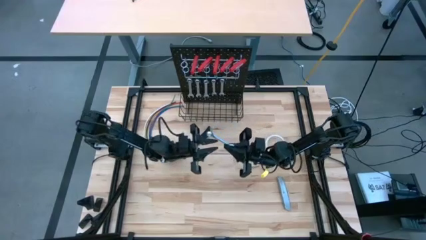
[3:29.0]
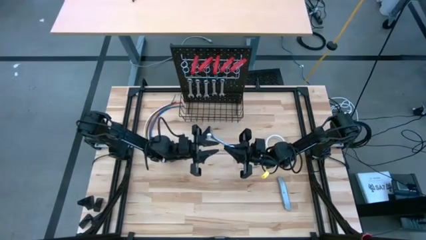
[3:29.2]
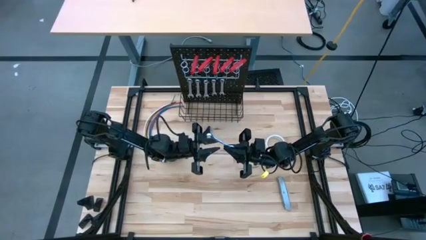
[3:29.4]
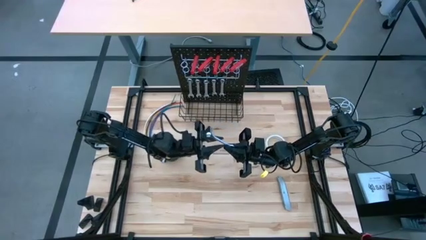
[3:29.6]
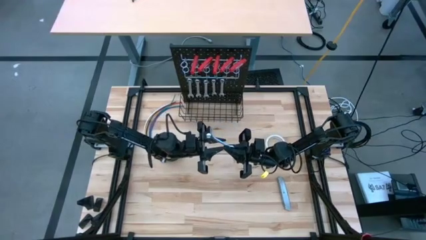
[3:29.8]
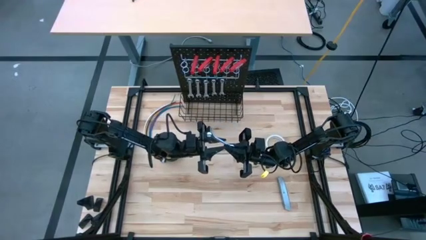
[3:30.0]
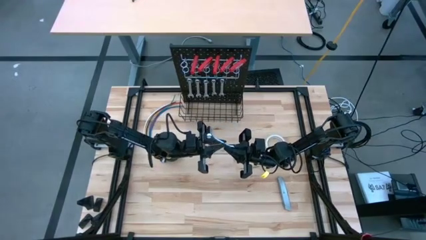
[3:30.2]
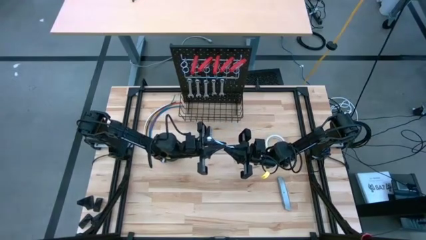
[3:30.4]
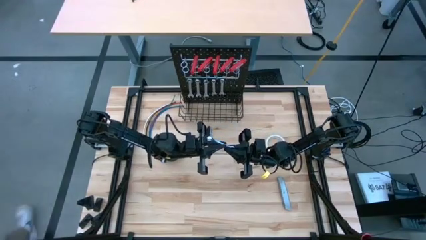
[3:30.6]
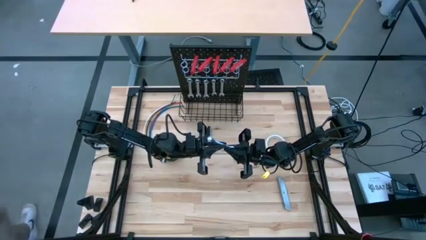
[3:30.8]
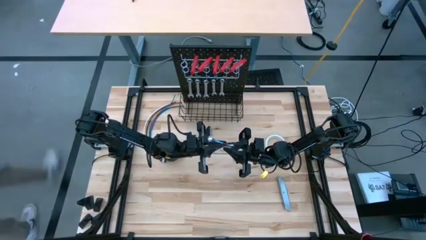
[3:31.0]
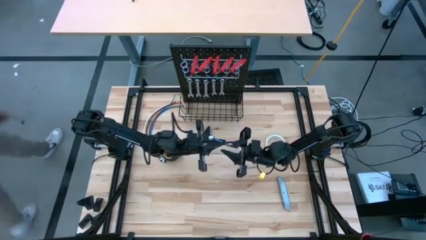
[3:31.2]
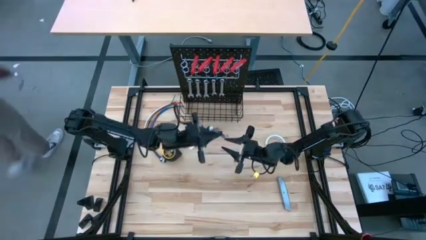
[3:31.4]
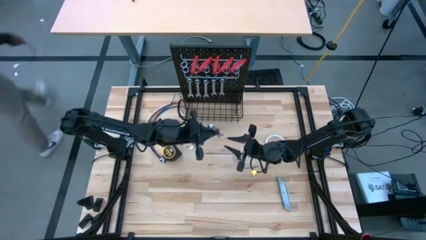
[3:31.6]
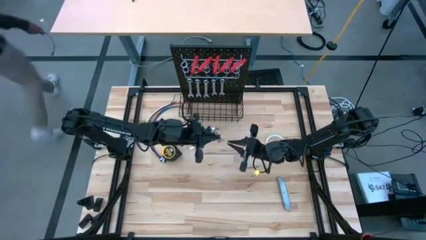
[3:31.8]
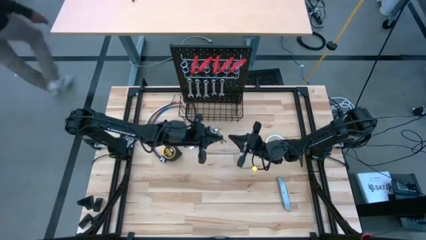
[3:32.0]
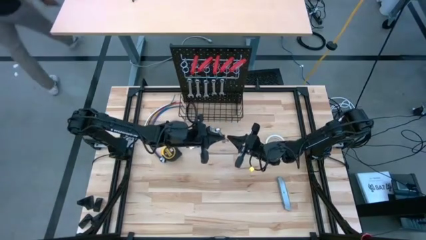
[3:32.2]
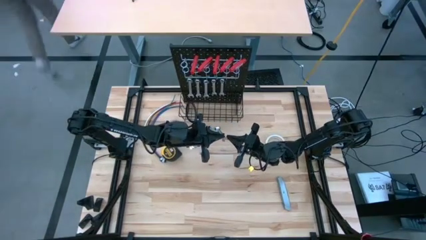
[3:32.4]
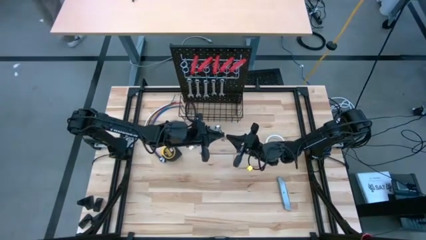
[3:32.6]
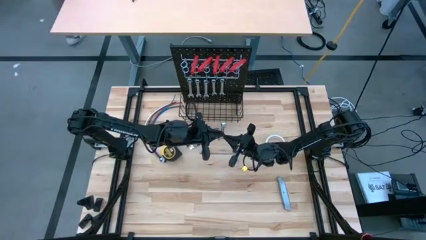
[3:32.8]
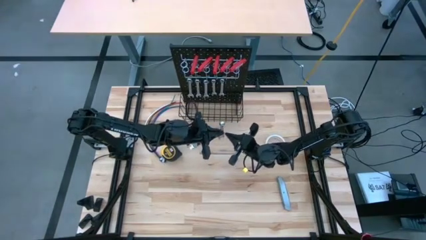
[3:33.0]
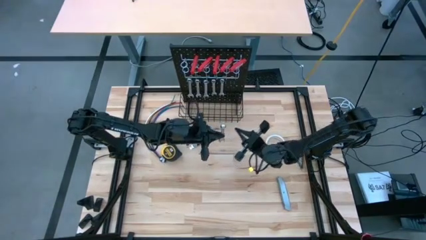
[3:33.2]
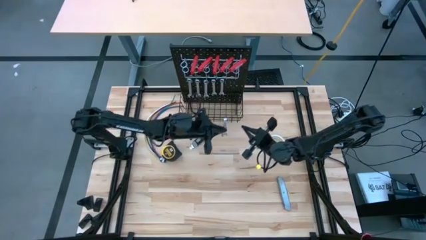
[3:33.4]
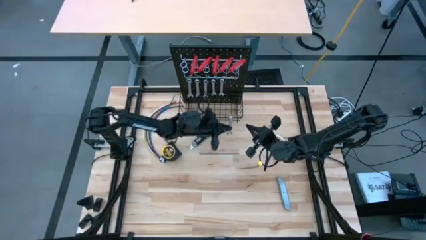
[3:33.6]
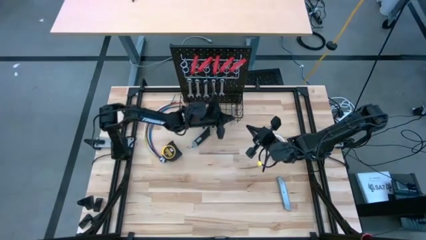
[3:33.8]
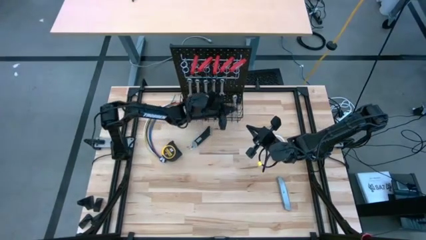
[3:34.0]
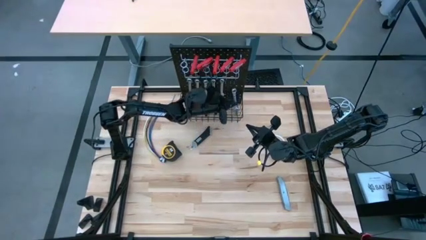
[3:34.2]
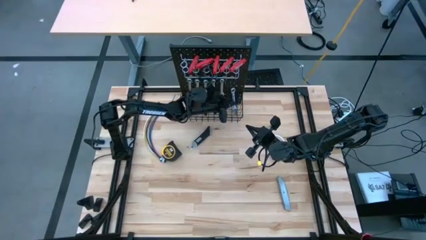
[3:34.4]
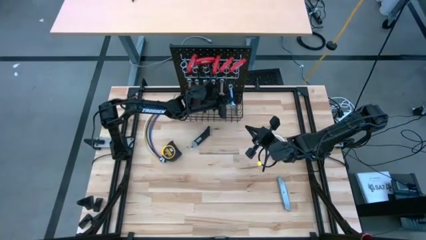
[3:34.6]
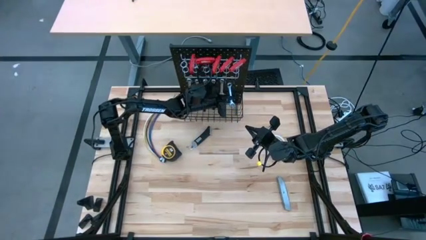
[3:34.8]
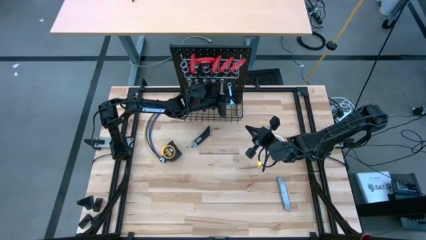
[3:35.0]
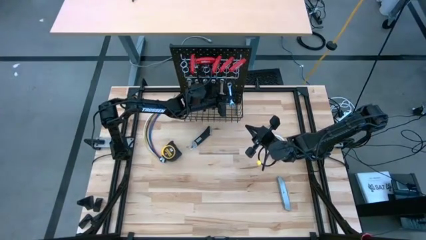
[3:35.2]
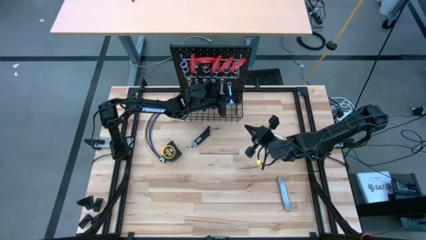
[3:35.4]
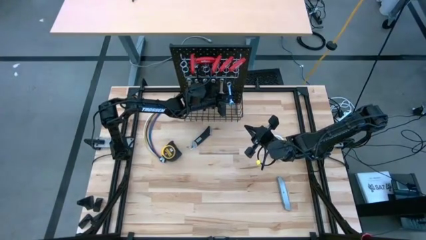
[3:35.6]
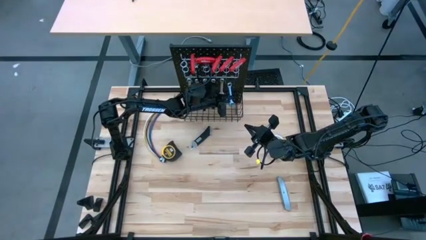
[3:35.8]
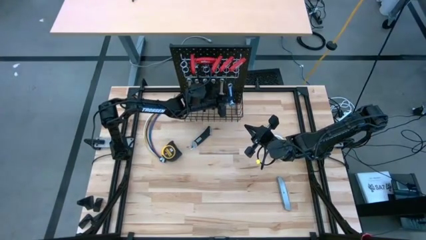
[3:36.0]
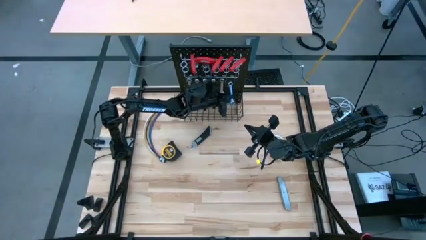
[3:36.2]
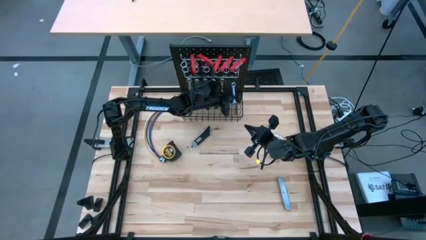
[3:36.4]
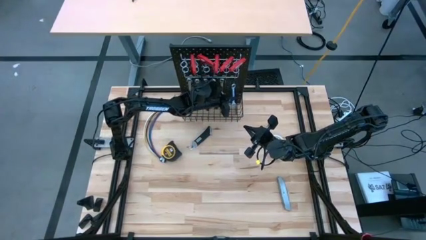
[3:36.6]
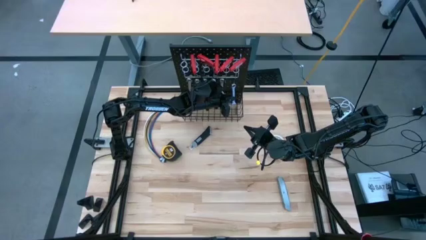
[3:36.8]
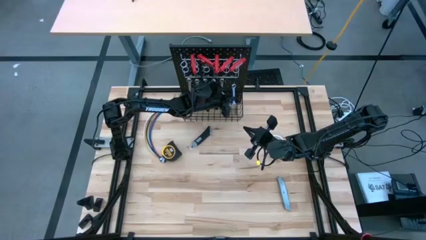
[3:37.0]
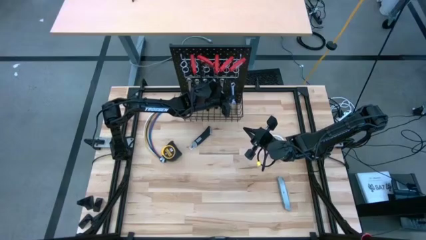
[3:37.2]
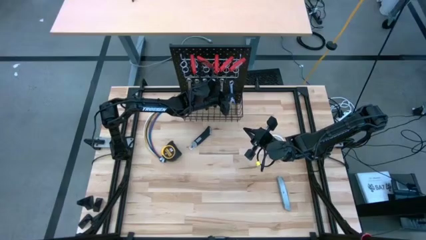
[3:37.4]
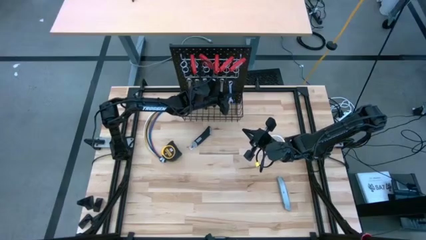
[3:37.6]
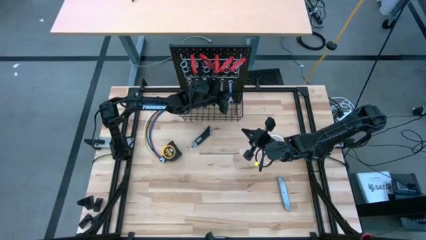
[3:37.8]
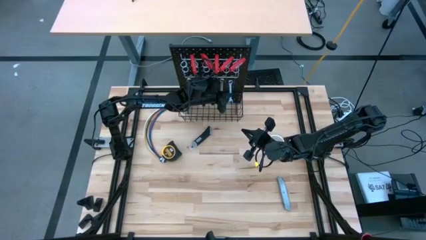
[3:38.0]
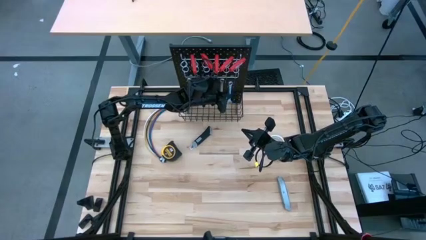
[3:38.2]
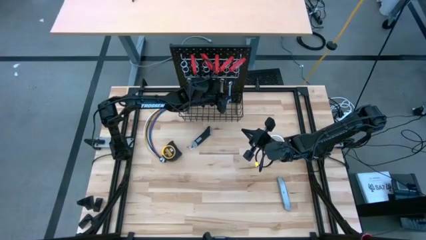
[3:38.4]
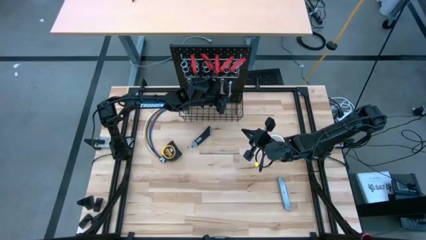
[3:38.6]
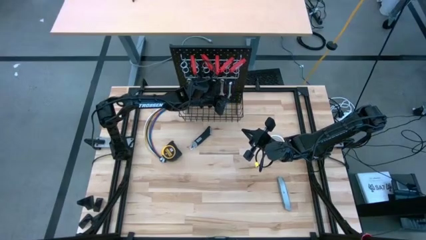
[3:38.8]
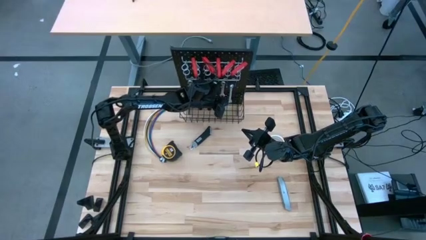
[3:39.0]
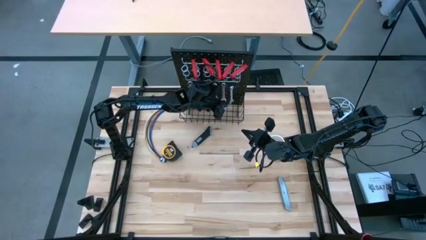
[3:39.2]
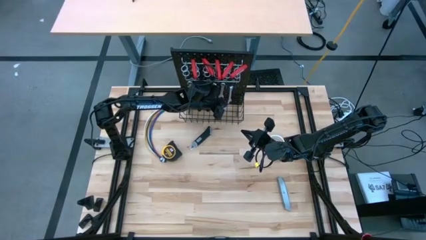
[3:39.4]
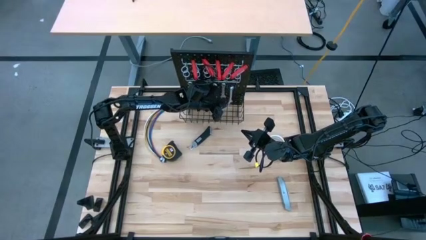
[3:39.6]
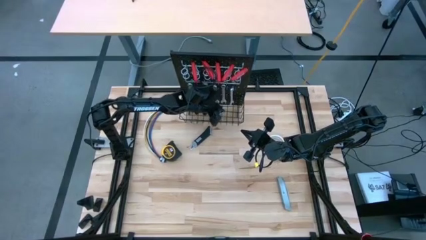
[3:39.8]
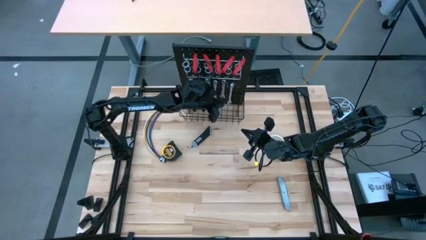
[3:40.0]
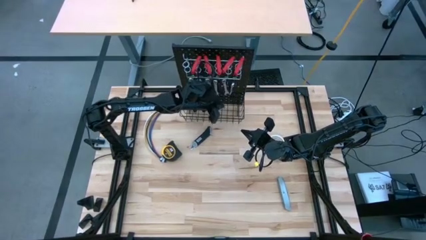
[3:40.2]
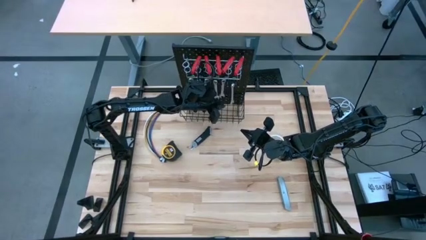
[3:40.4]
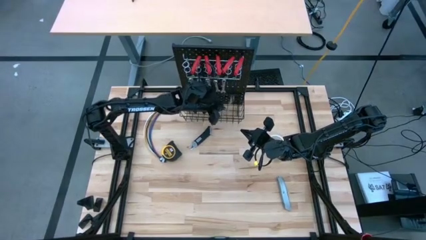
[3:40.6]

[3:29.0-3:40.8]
Task: Hang tools onto peg board
Hang the wrench on the peg board

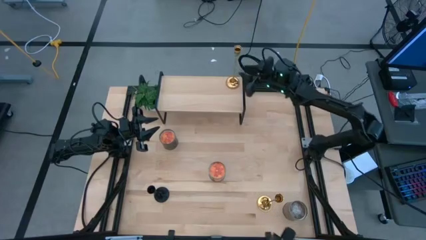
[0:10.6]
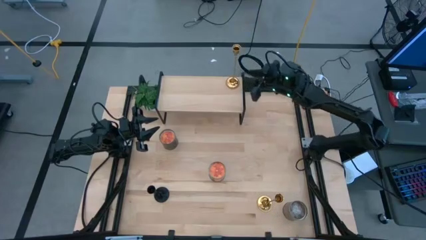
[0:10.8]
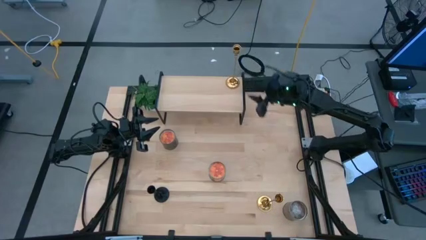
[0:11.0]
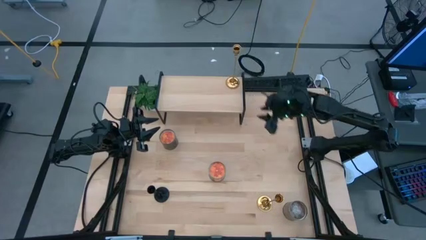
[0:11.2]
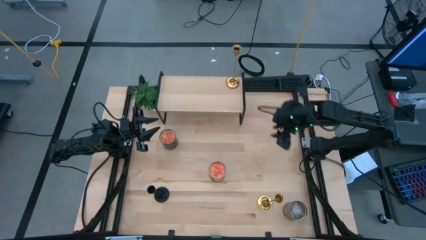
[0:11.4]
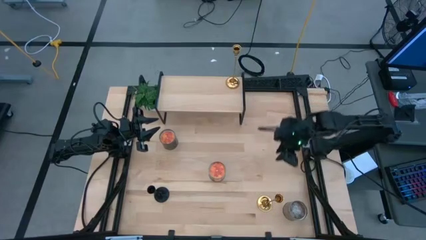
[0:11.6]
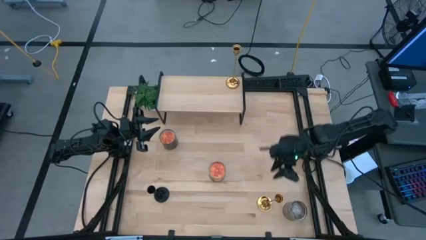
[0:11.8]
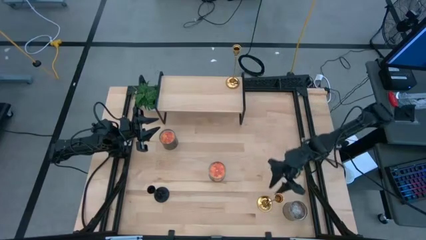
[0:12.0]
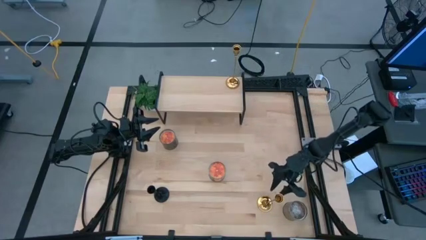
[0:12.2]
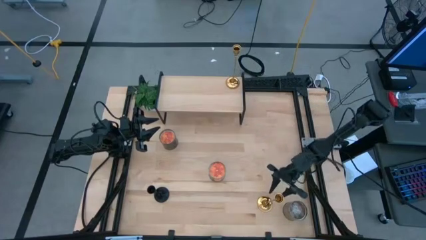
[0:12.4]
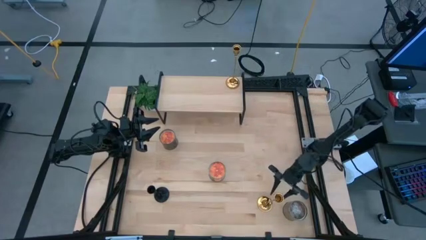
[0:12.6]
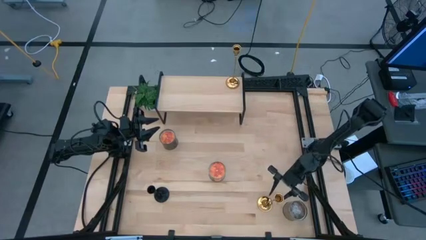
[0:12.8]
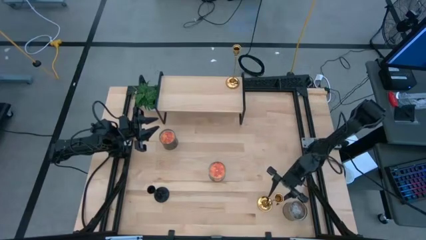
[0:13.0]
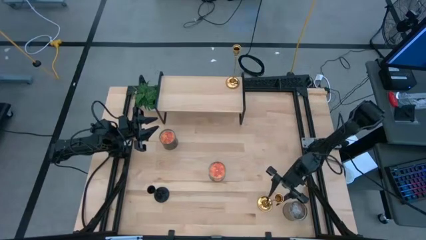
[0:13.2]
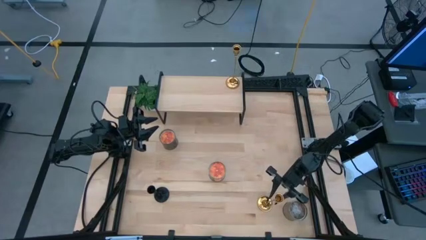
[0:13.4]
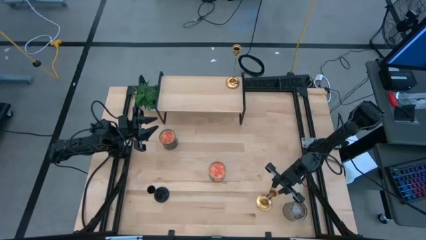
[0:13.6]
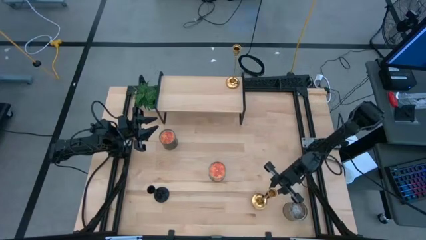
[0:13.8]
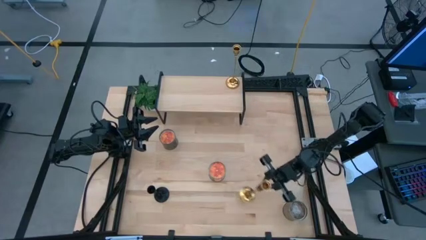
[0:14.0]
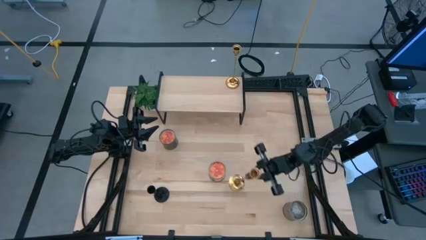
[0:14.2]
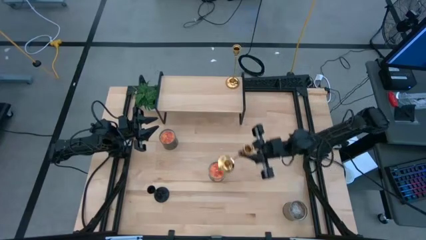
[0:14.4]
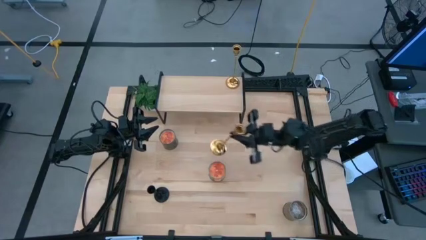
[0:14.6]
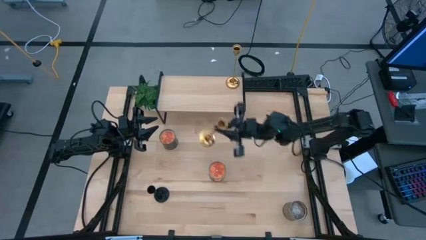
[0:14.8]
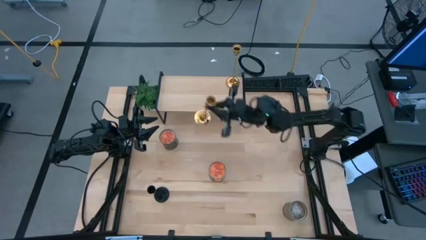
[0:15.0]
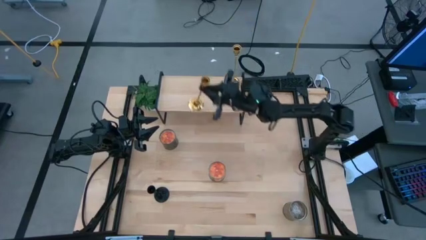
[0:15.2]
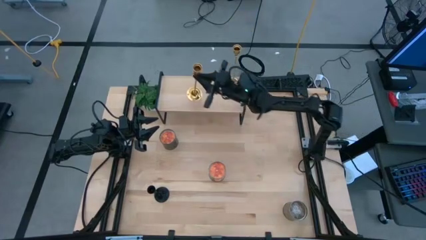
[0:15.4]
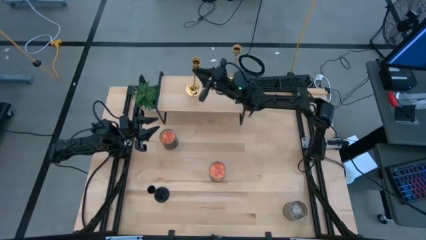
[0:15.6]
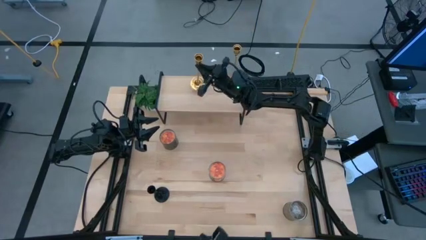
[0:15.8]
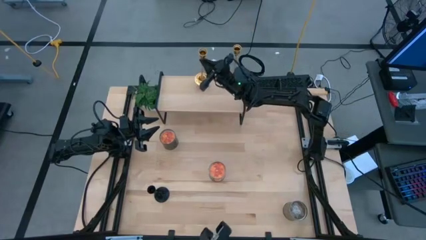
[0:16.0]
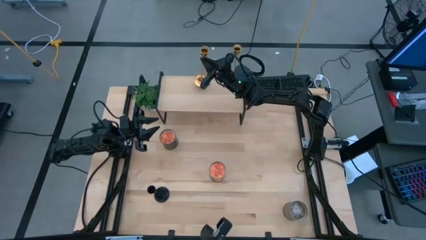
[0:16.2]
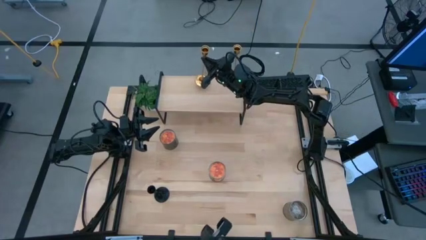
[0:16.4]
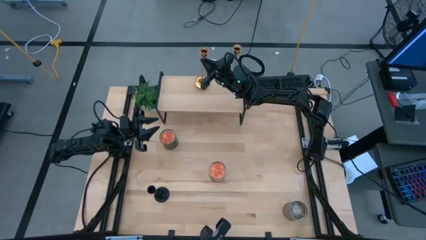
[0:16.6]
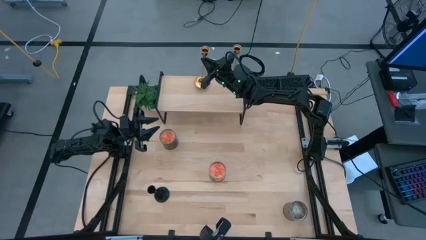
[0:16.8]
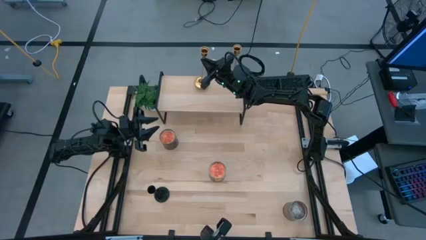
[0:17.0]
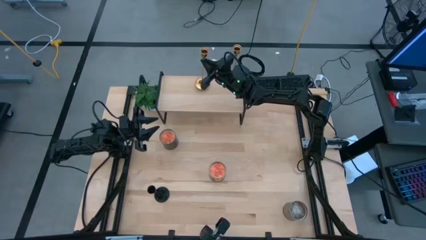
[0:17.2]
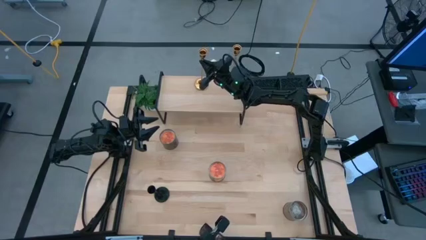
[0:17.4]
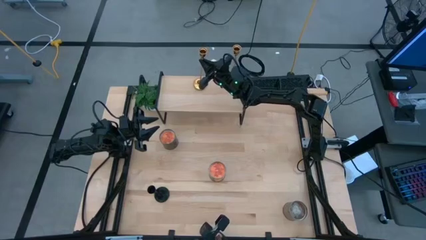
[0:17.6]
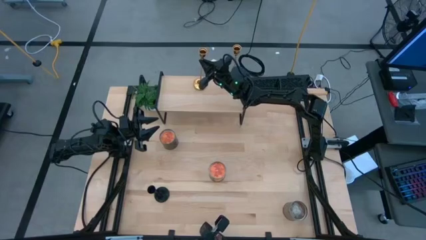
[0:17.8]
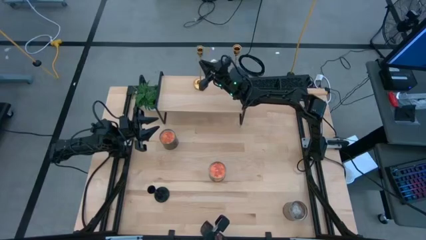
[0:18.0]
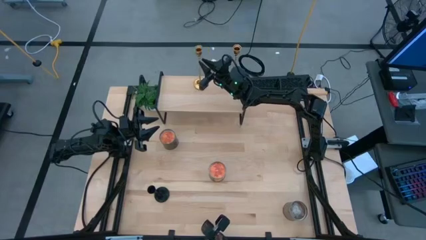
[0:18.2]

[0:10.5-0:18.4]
Task: Pick & Place candle stick holders
Put the gold candle holder on the shelf
